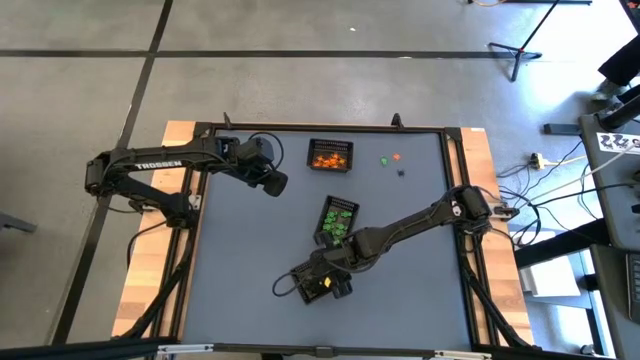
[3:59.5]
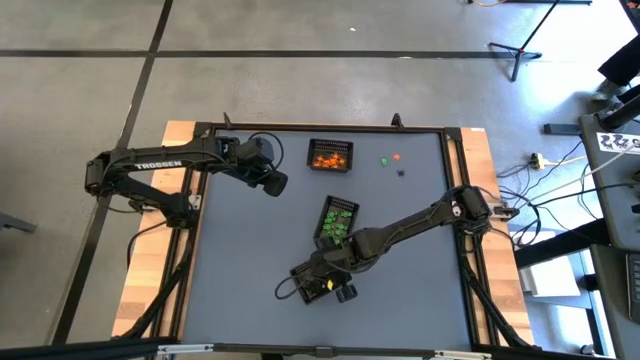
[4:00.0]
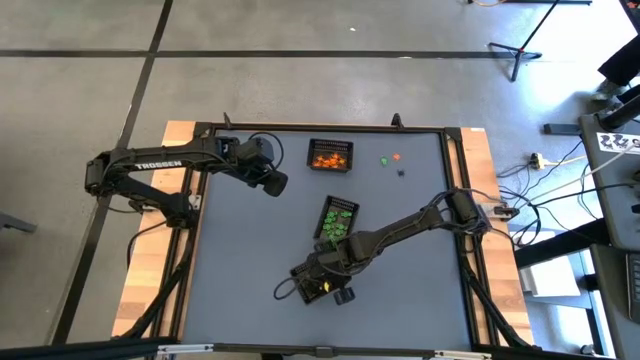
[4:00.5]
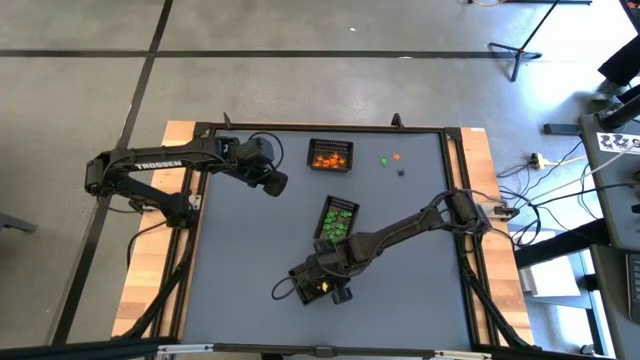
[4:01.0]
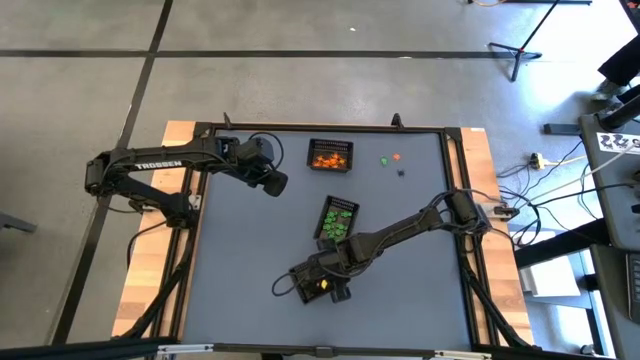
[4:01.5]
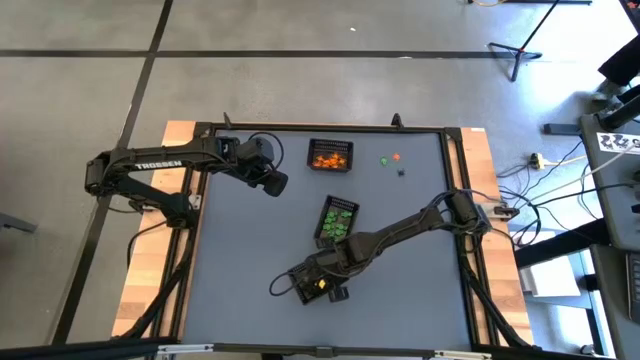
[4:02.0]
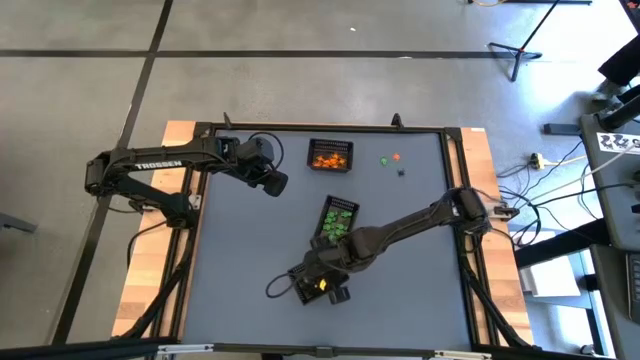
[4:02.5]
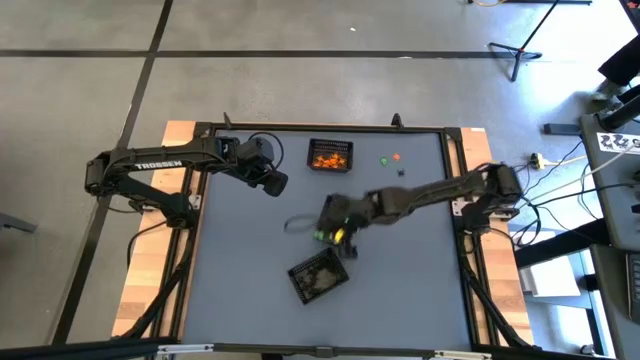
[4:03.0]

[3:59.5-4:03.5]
Task: Sort Halloween decoration
Put the green skeleton toy into the center black bin

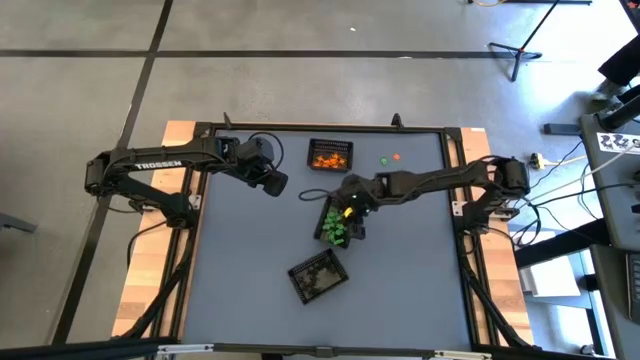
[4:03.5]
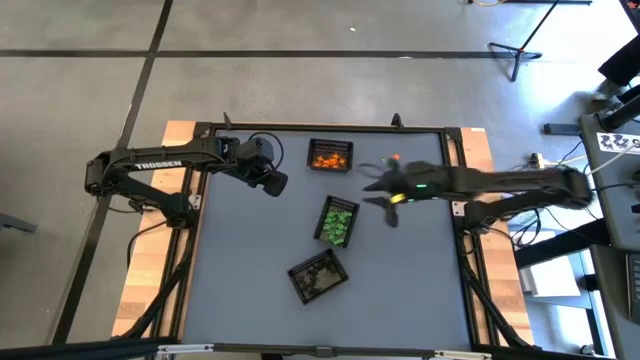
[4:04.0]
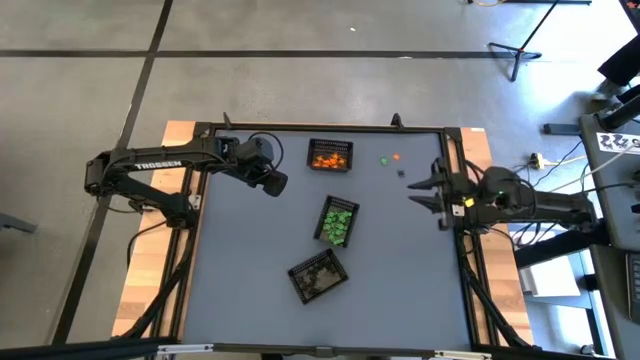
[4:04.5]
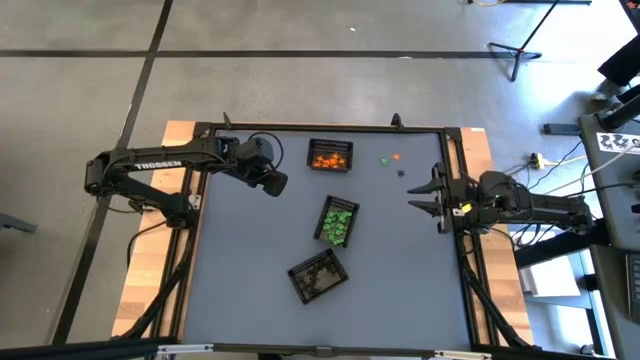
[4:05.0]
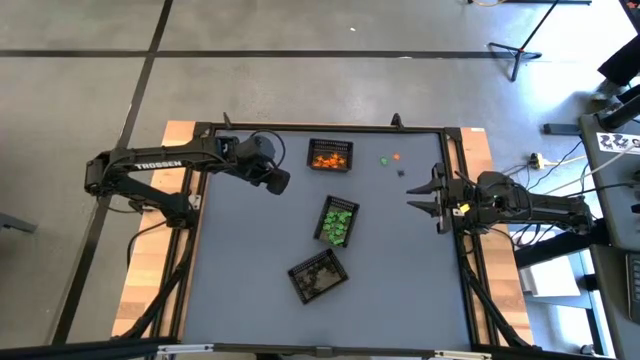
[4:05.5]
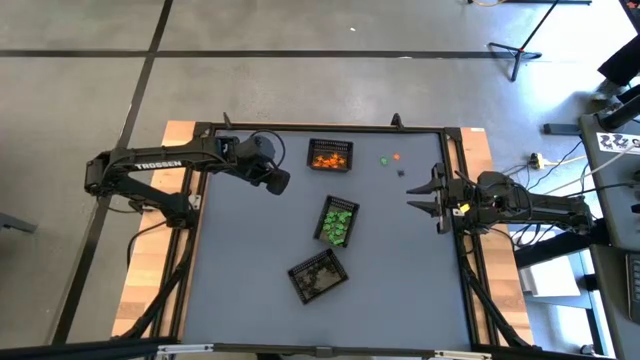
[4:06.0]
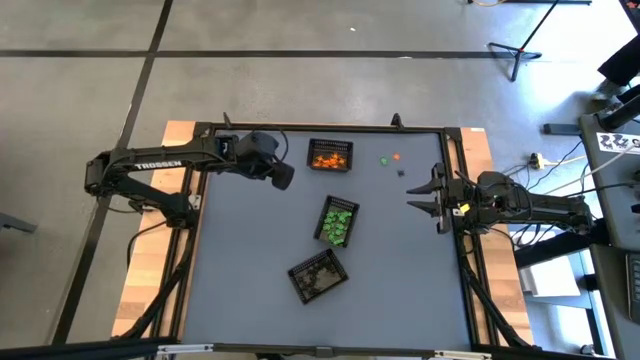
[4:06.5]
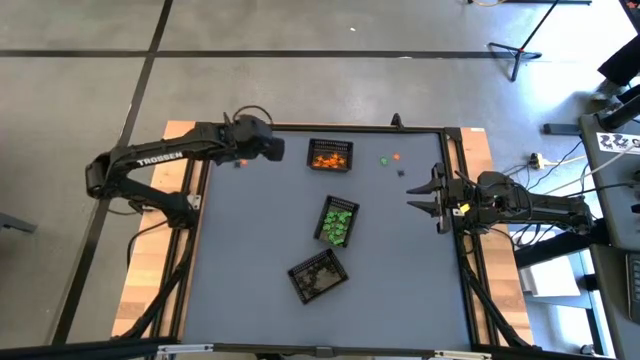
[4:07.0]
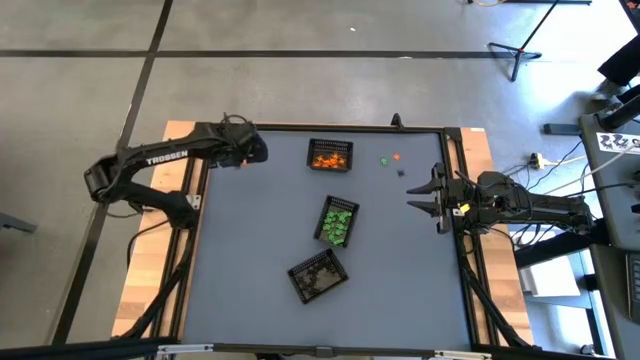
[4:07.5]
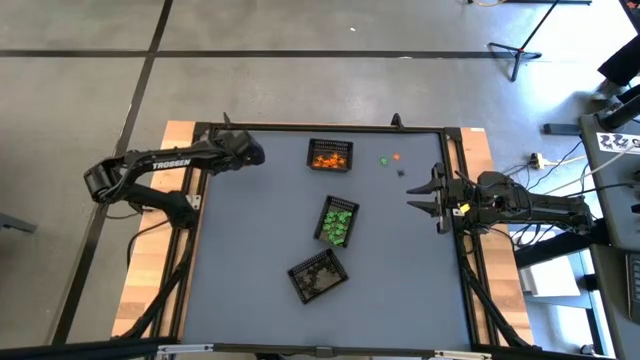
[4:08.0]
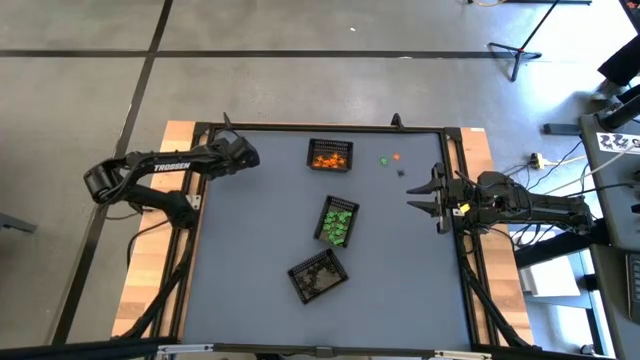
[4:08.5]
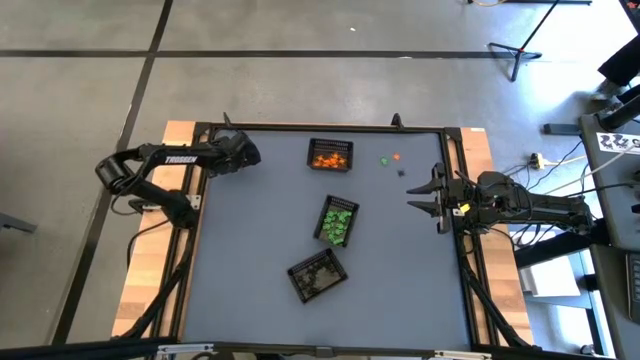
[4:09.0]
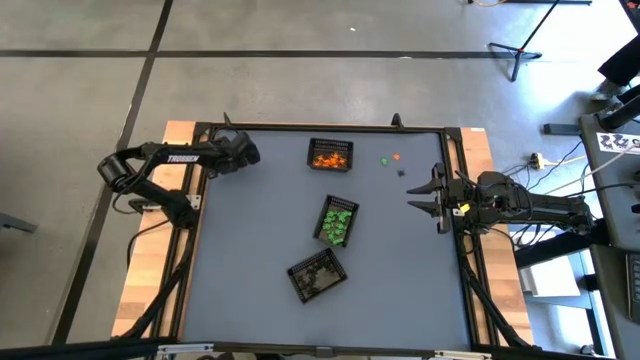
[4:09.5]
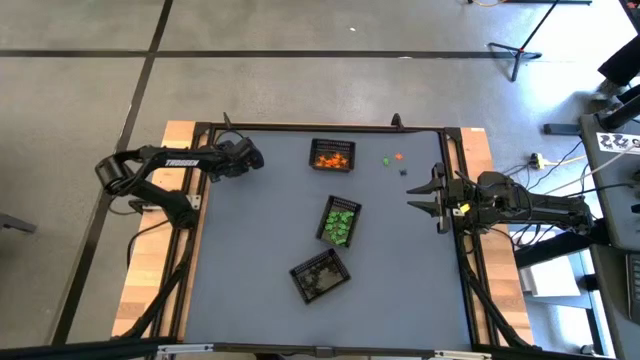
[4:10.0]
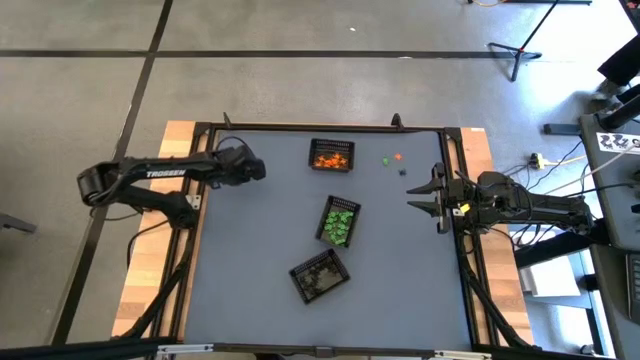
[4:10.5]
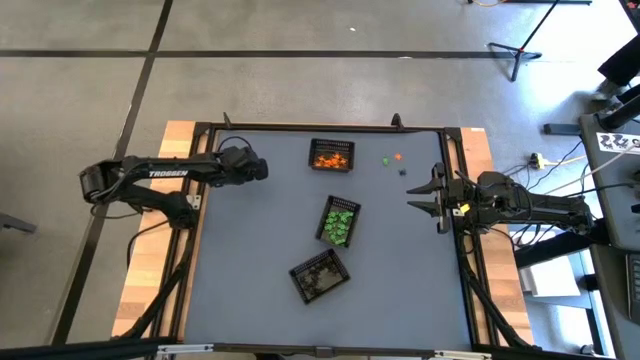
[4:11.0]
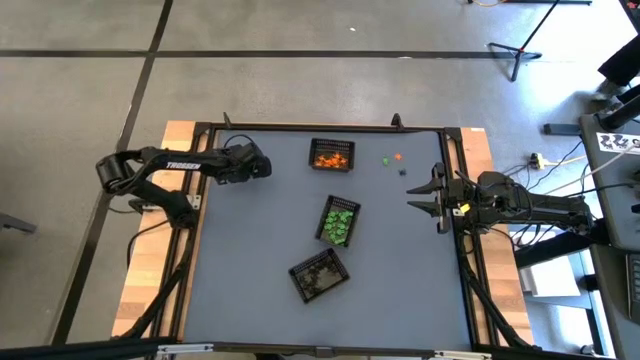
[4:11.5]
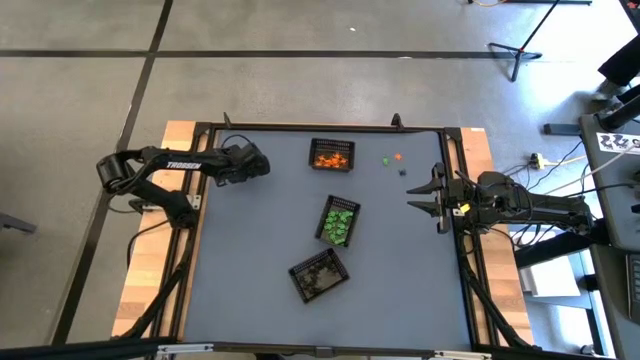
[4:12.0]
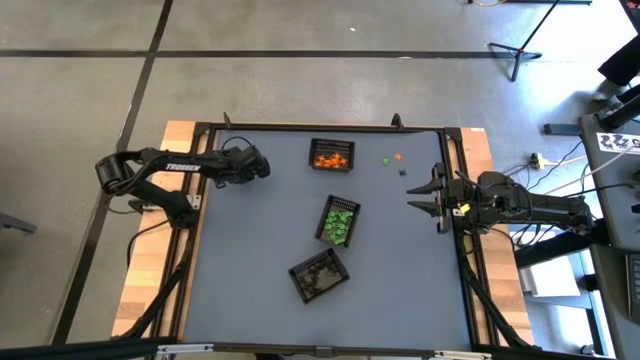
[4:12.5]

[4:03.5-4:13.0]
Put the black spider toy into the bottom black bin

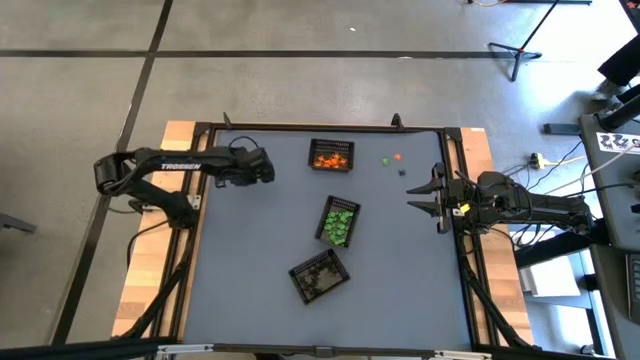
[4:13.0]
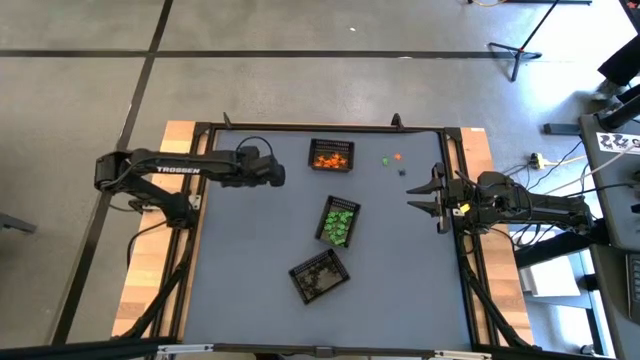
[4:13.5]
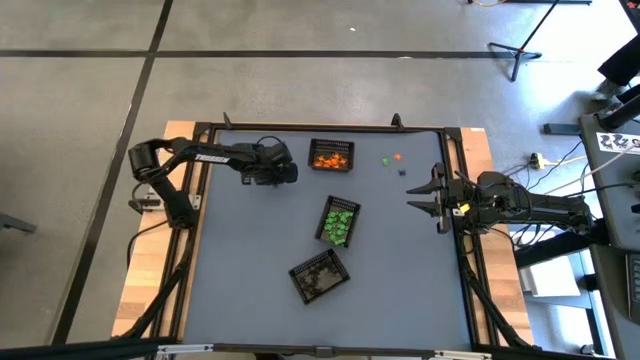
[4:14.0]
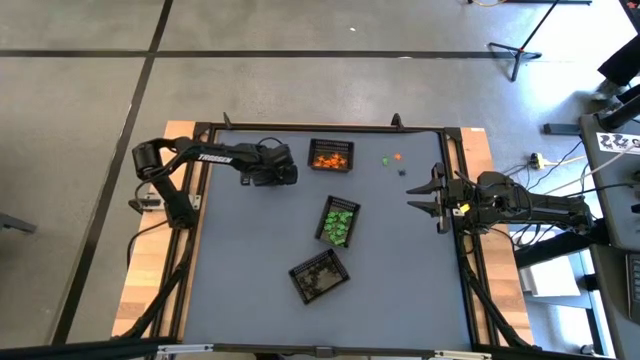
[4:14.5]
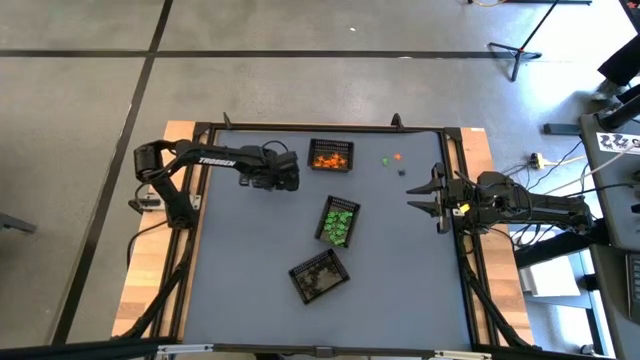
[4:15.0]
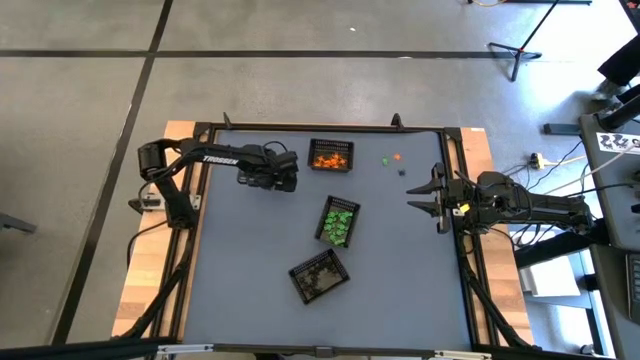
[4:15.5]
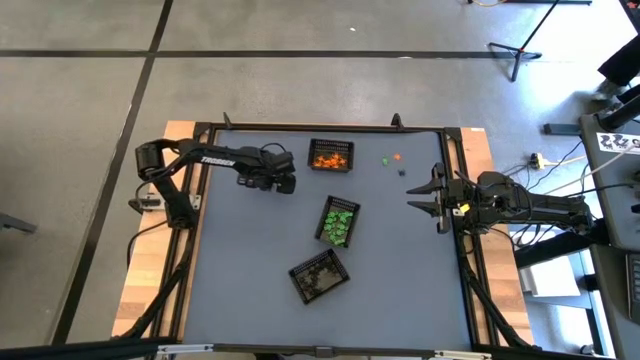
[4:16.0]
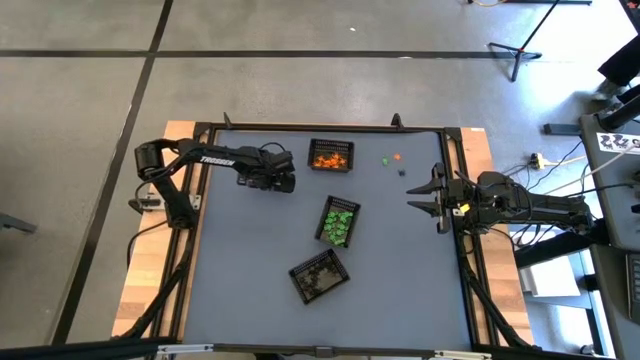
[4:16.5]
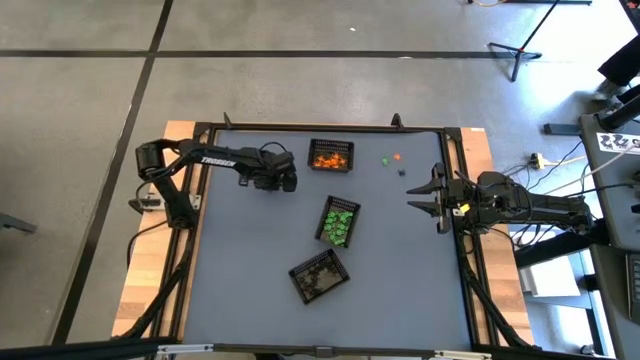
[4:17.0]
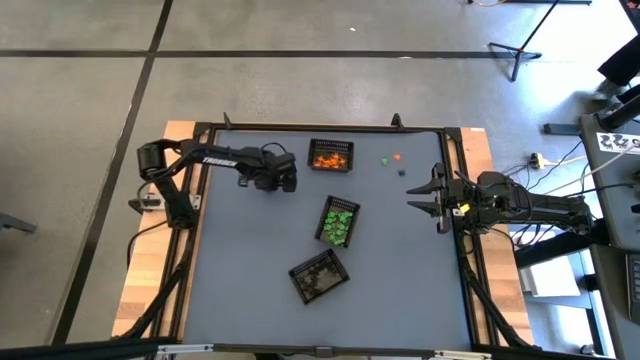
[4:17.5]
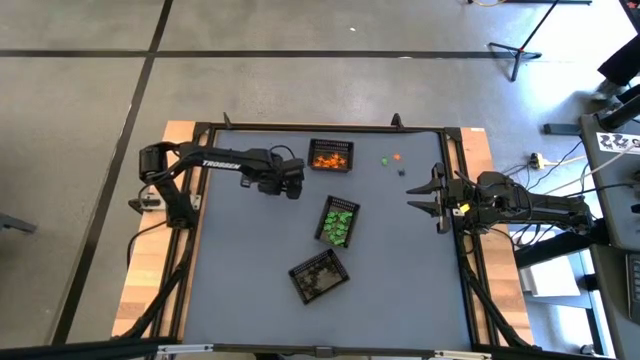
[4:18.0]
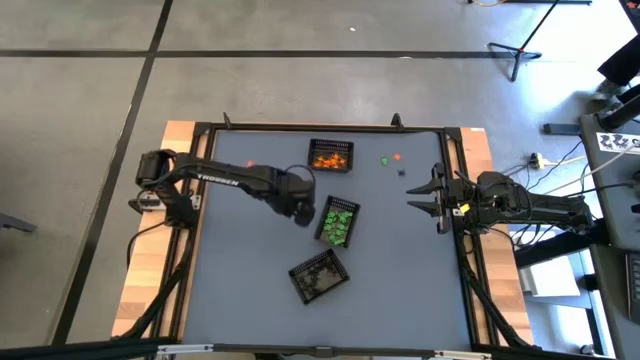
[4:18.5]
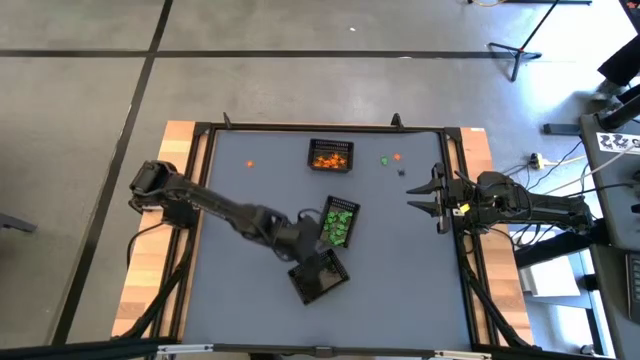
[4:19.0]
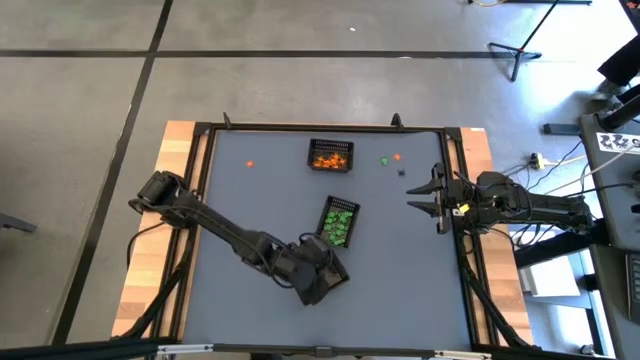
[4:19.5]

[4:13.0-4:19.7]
Put the black spider toy into the bottom black bin

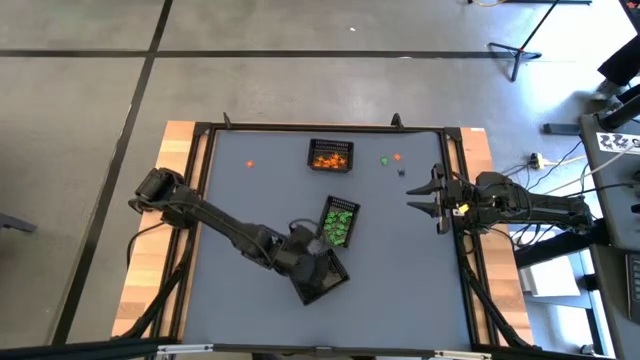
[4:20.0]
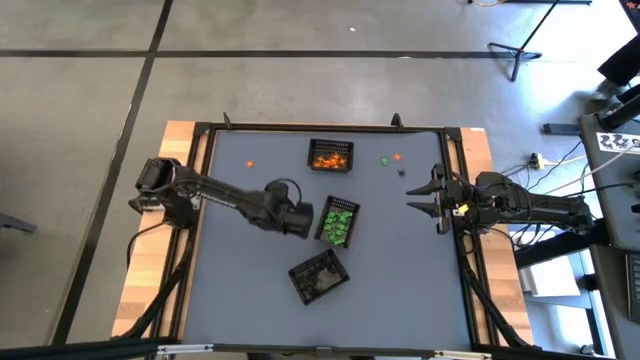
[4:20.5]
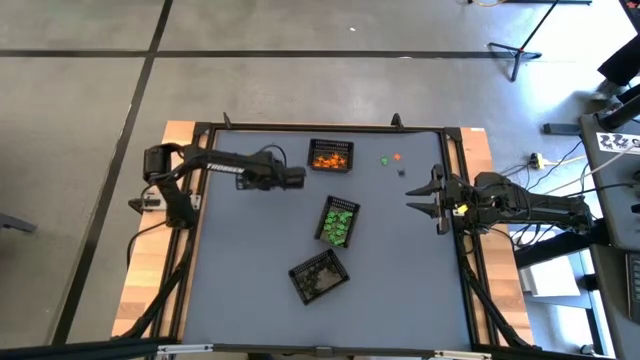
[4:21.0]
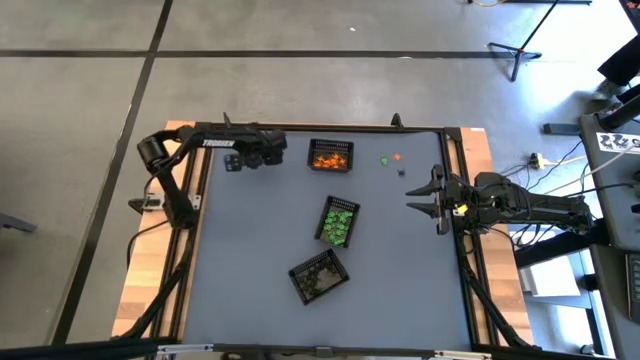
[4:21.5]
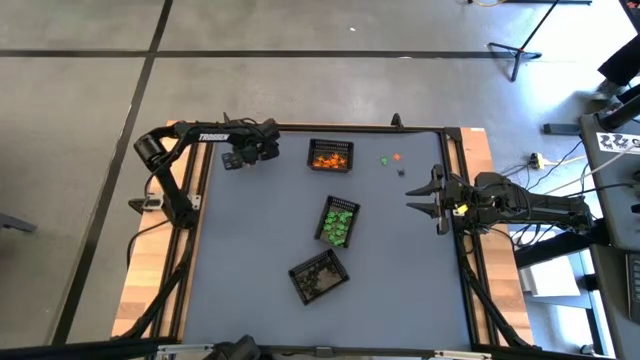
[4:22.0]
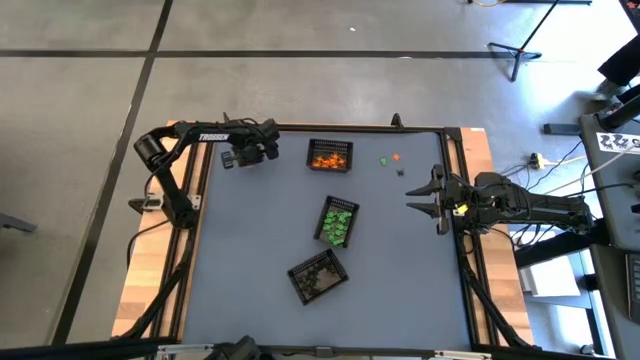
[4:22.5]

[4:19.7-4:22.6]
Put the orange spider toy into the top black bin
